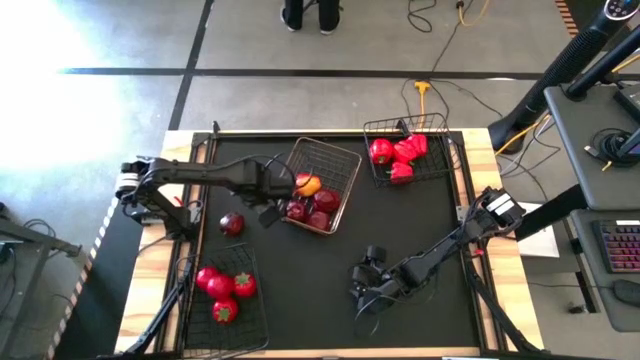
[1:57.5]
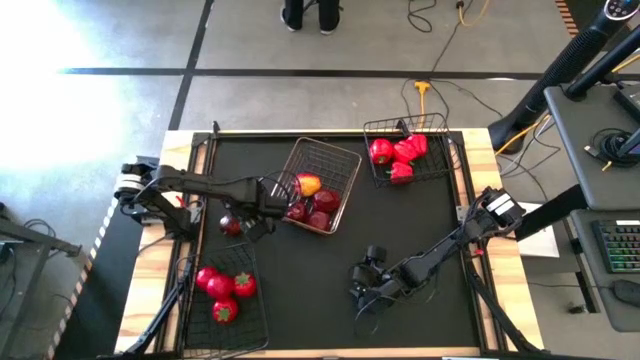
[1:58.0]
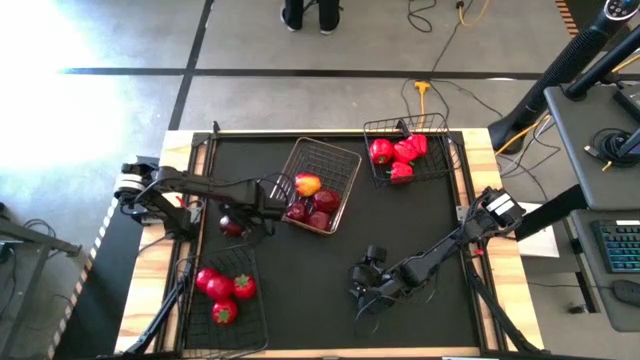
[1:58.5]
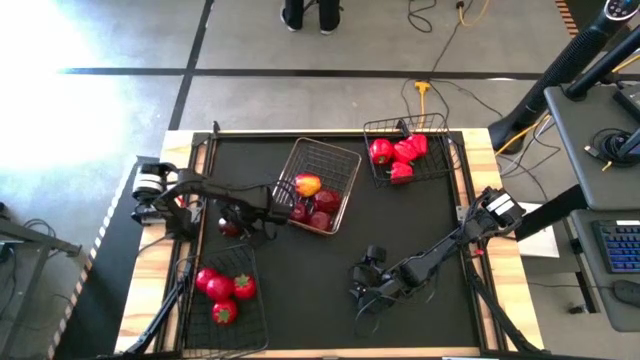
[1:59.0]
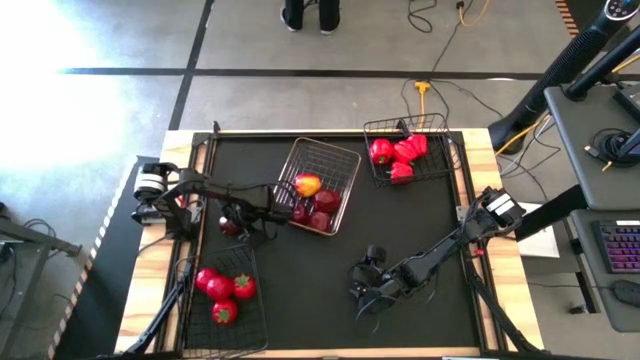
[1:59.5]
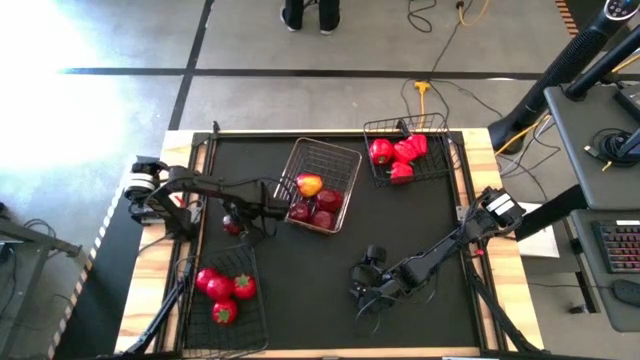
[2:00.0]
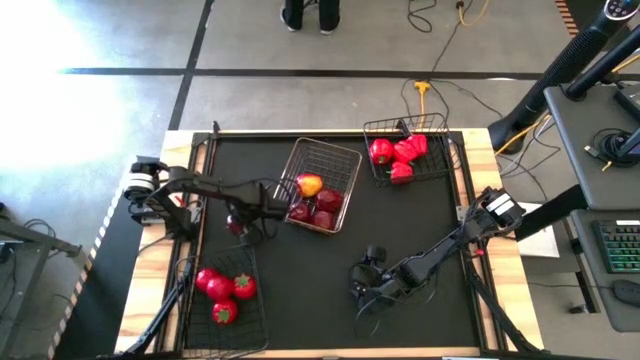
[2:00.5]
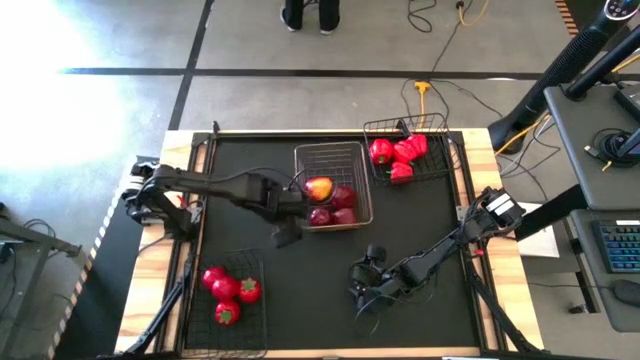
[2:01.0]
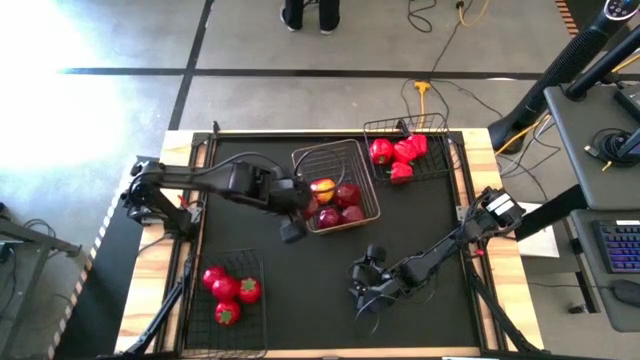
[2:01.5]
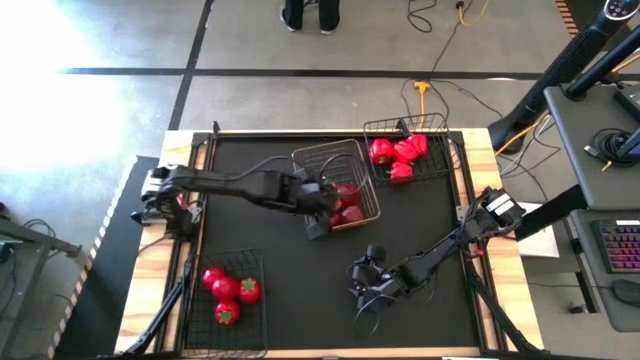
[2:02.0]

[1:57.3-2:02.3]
Task: Sort produce into baskets
Put the red apple into the gold wire basket

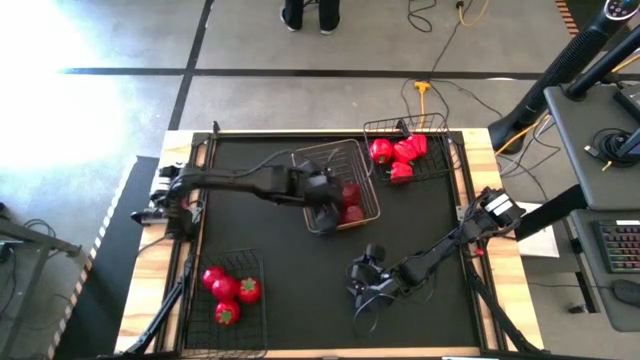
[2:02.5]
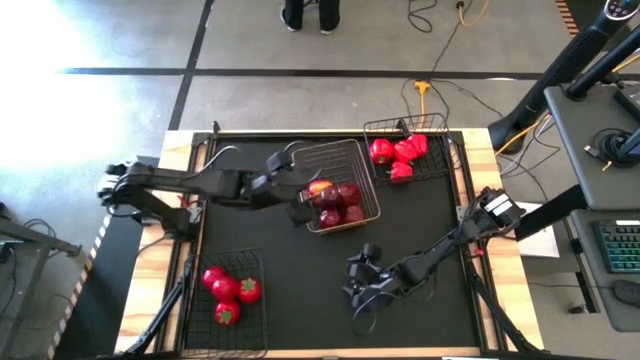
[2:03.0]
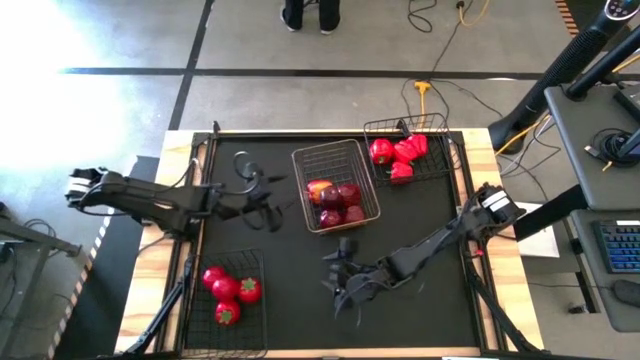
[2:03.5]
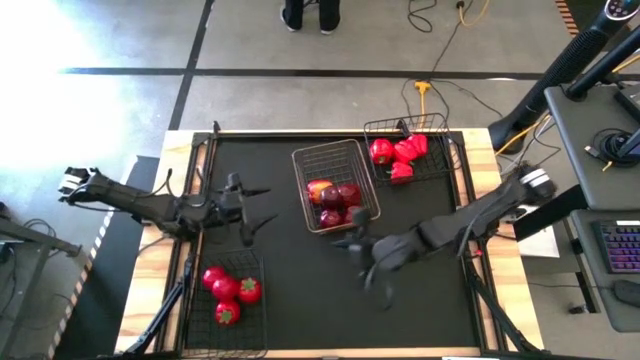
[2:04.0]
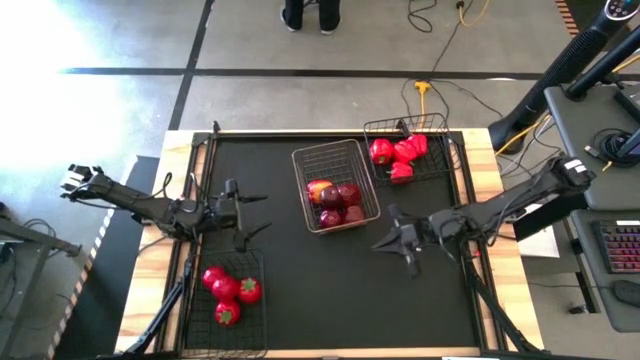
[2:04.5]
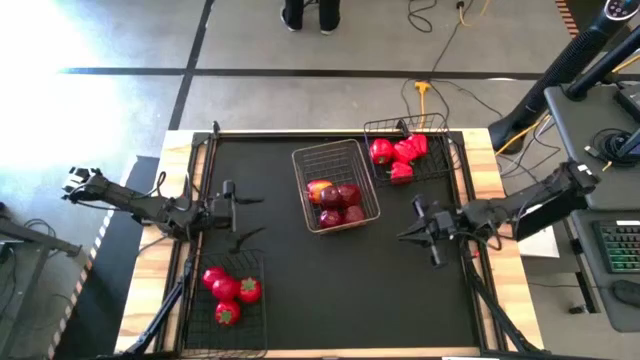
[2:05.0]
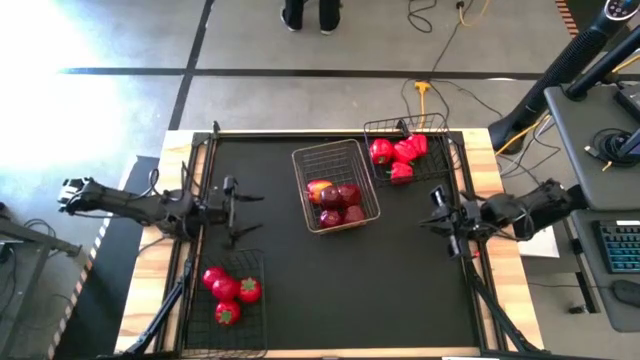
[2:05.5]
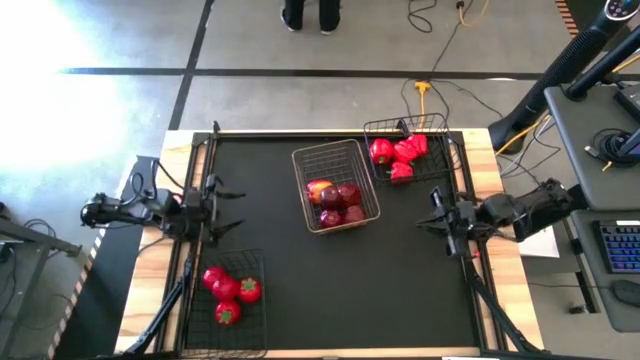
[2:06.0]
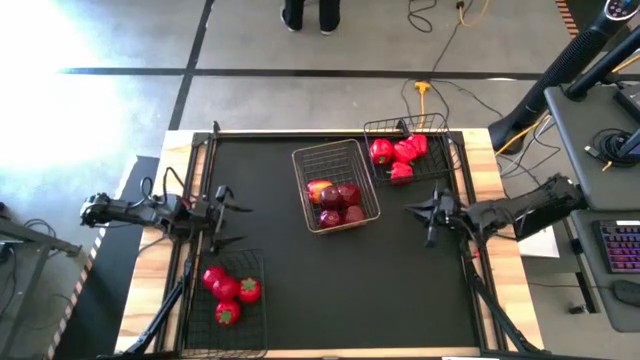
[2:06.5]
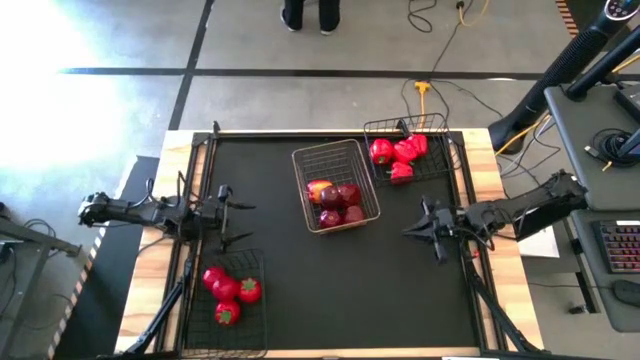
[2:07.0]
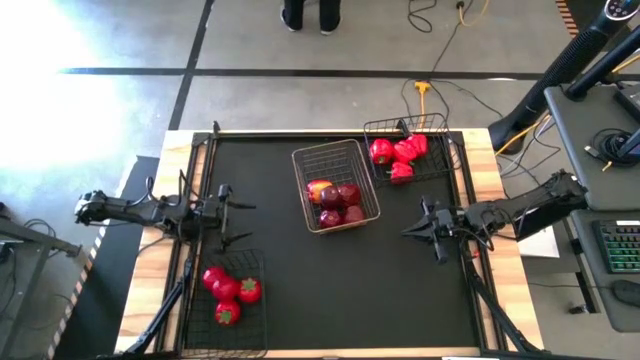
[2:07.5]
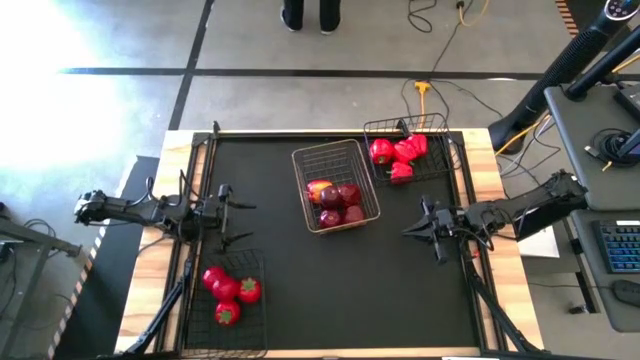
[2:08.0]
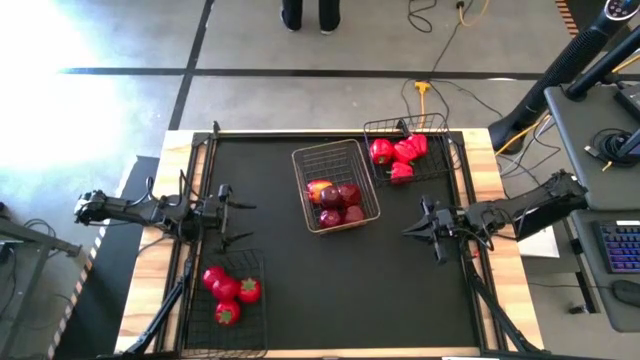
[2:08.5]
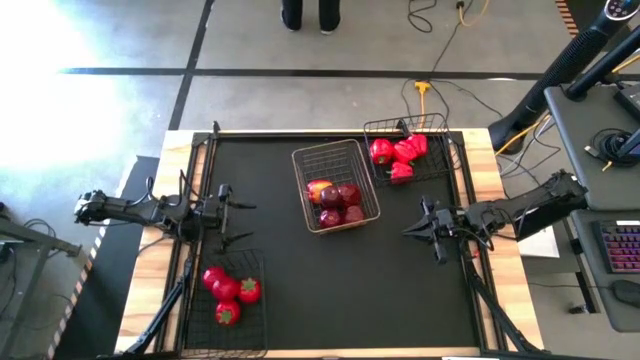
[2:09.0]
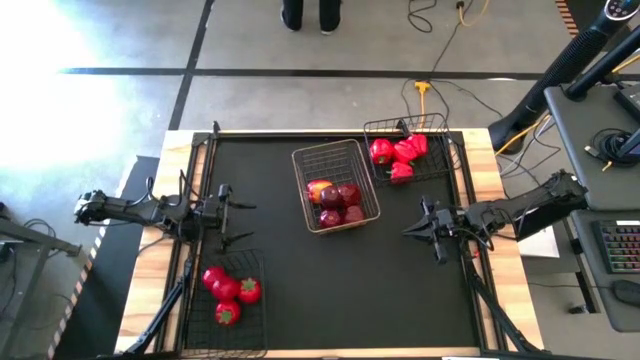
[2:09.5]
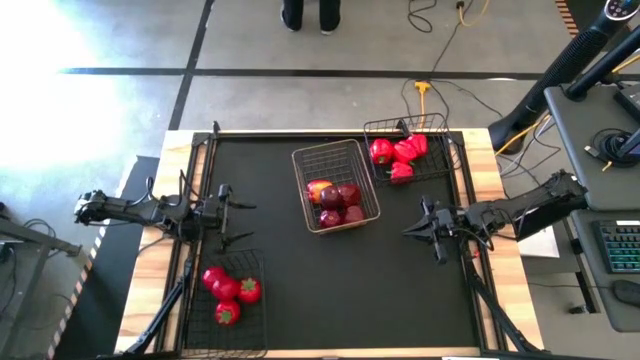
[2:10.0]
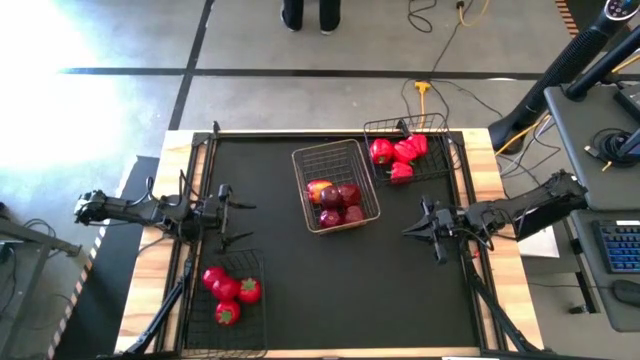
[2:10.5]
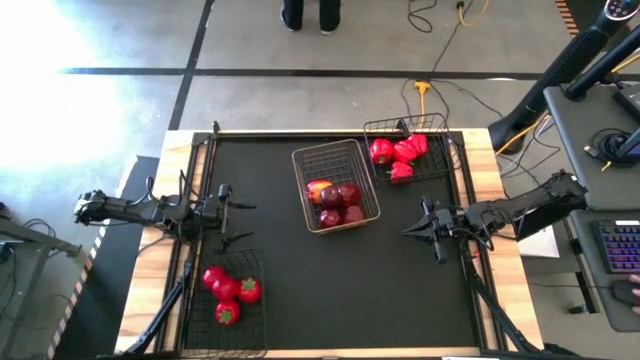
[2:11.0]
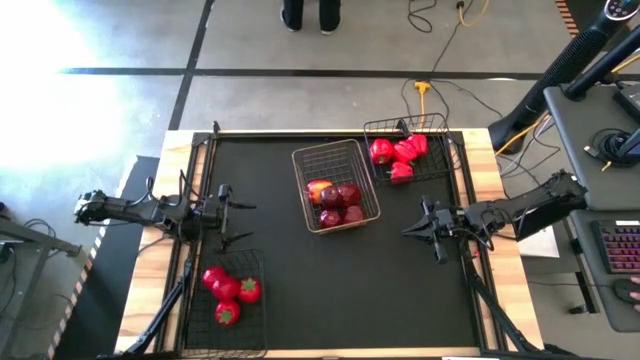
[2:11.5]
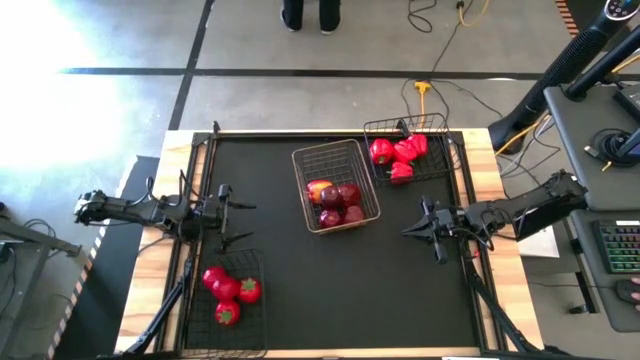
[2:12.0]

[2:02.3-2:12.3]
Return to Home Position

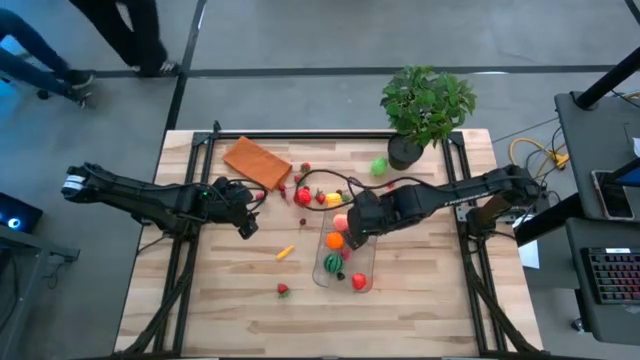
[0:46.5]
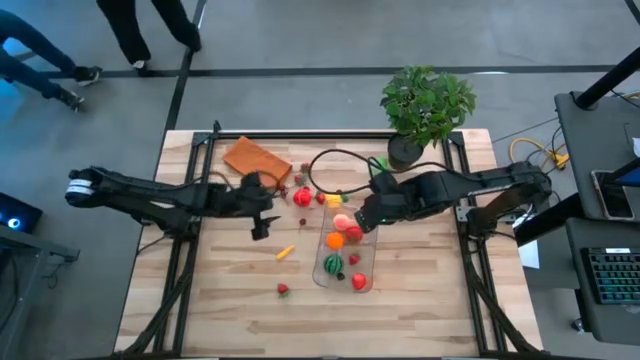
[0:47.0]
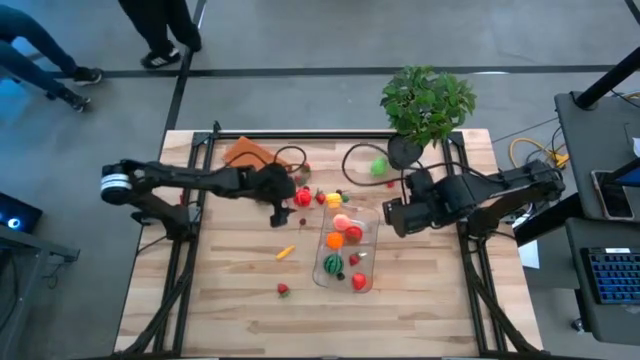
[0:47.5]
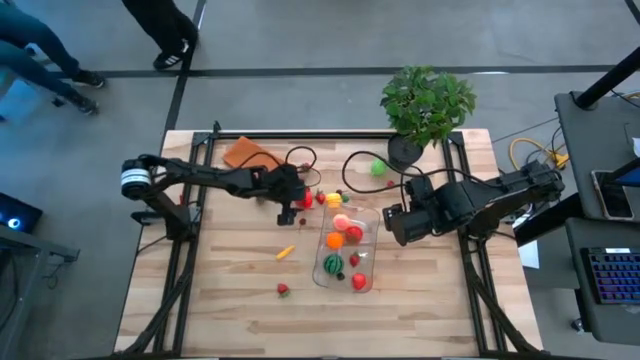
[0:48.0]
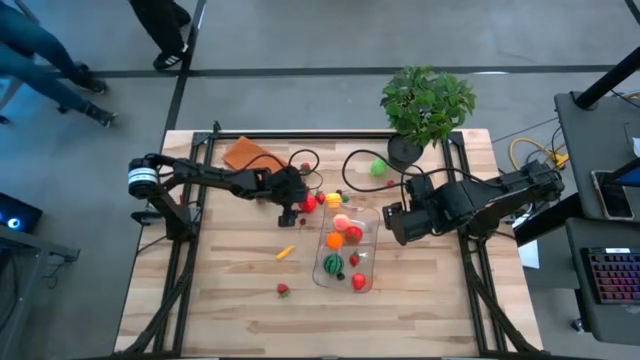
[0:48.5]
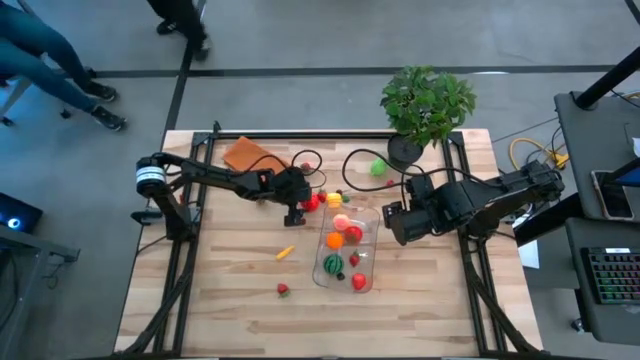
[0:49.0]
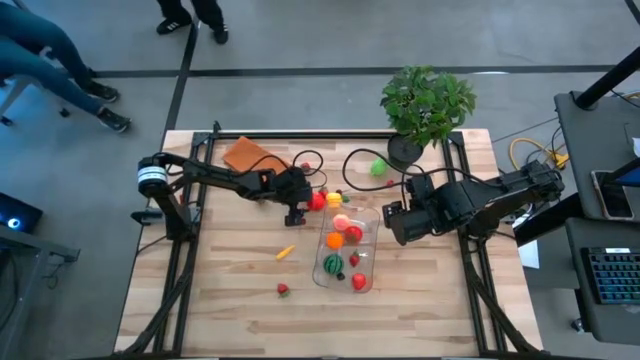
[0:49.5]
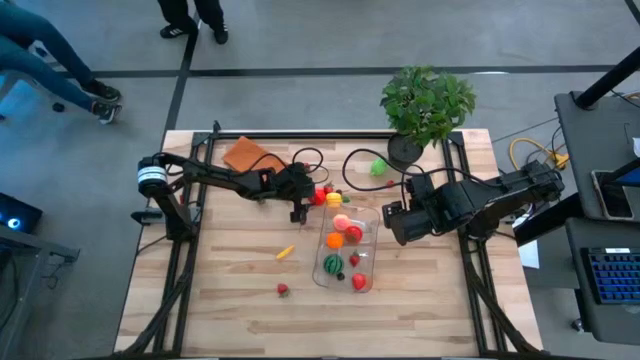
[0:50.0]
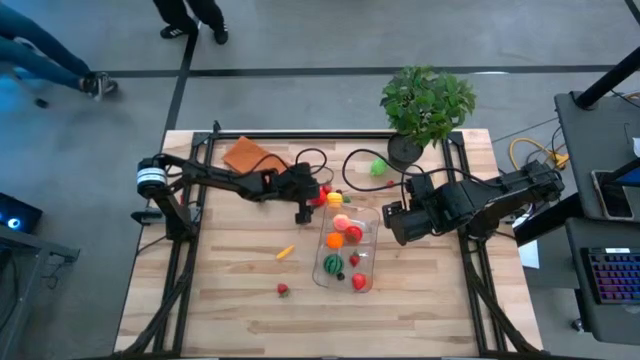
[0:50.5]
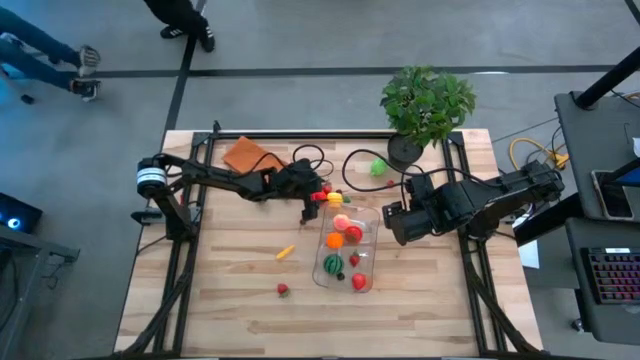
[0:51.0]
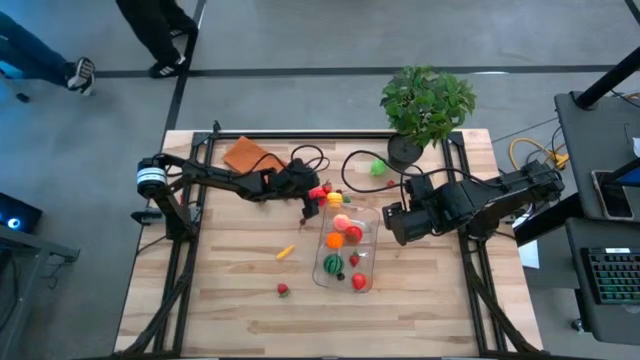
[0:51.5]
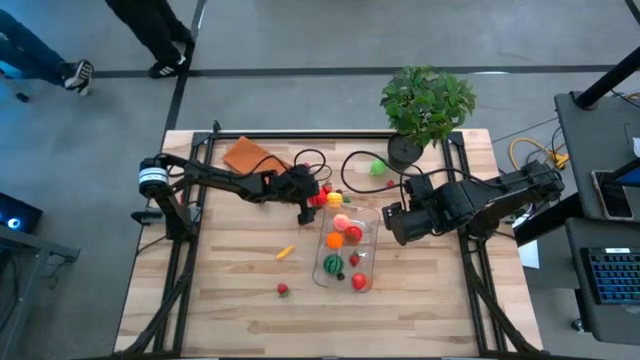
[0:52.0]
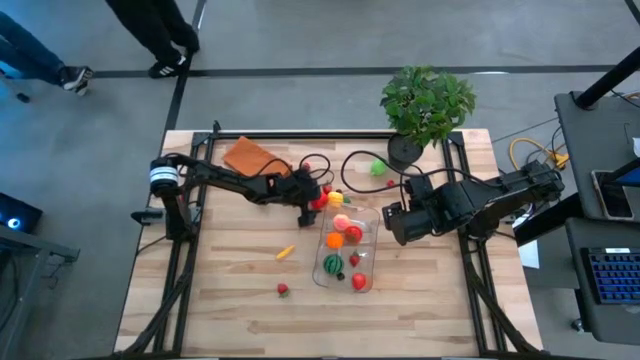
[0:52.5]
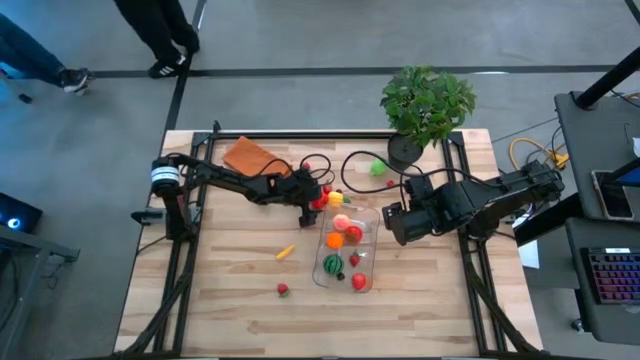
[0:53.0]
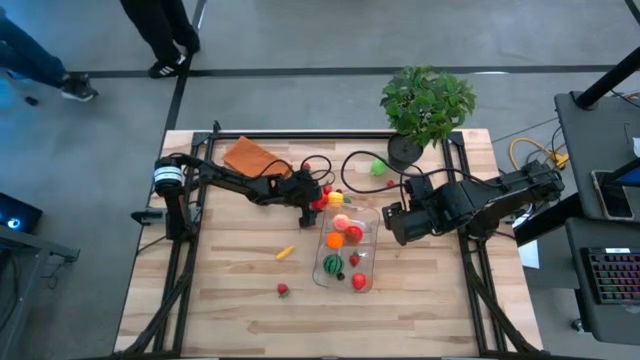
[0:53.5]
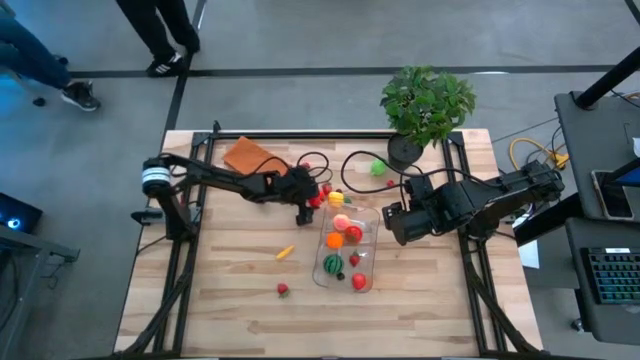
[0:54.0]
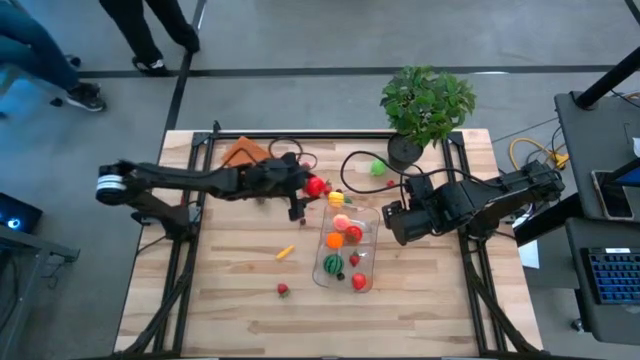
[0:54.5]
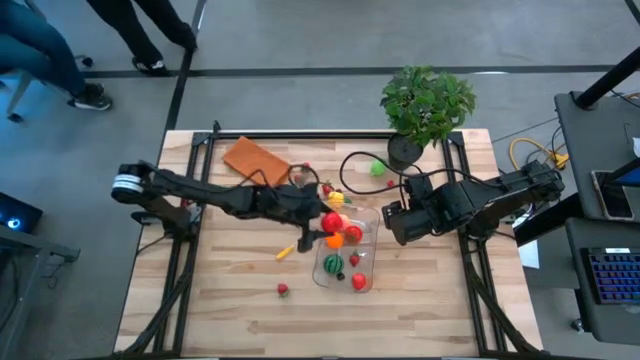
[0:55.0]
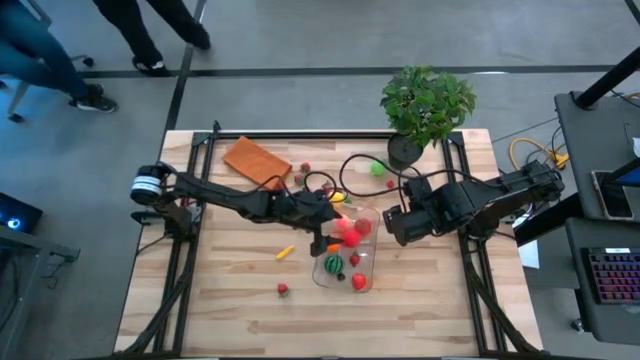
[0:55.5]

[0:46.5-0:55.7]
Task: Pick and placing Produce into tupperware
Put the pears into the transparent bin
